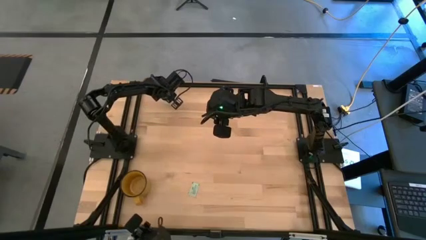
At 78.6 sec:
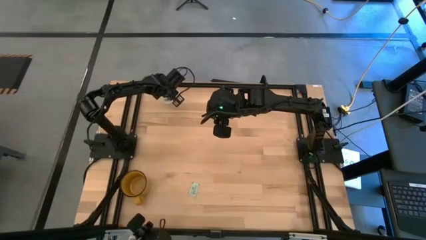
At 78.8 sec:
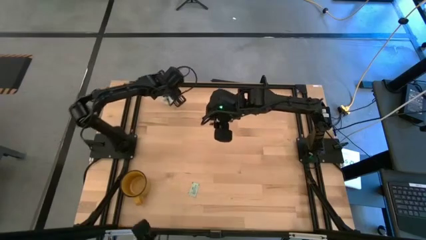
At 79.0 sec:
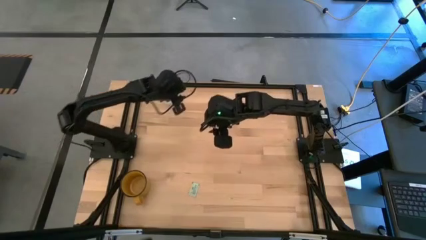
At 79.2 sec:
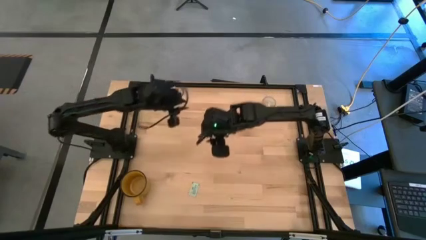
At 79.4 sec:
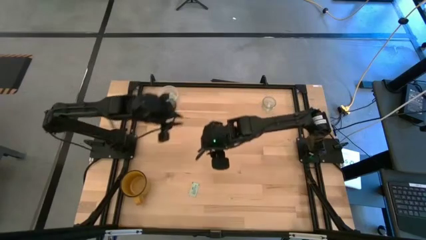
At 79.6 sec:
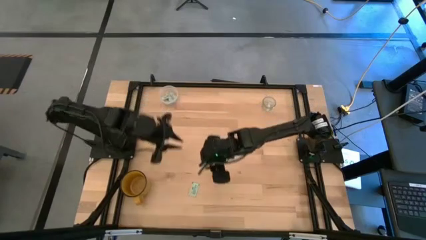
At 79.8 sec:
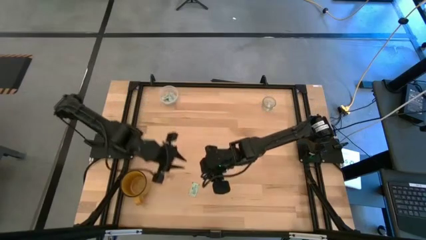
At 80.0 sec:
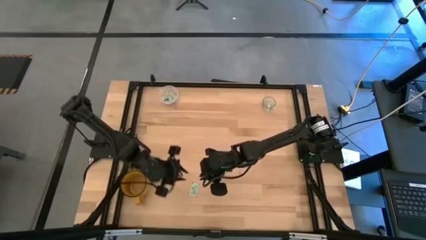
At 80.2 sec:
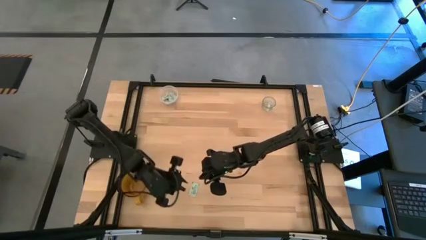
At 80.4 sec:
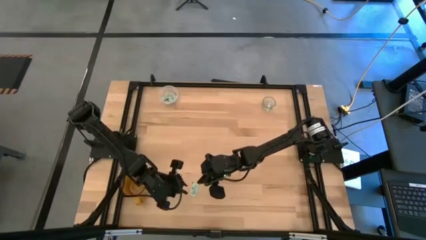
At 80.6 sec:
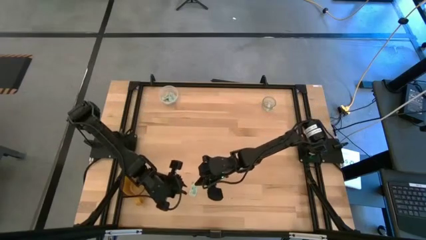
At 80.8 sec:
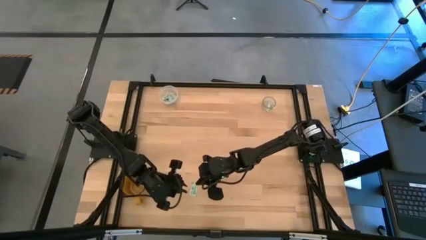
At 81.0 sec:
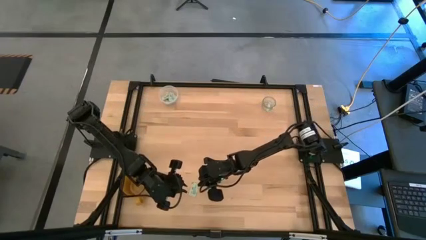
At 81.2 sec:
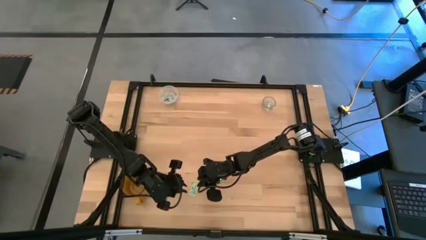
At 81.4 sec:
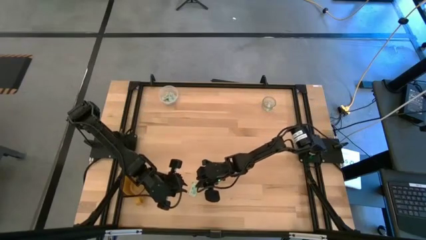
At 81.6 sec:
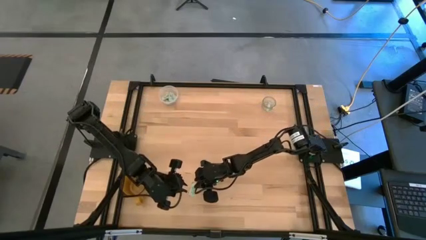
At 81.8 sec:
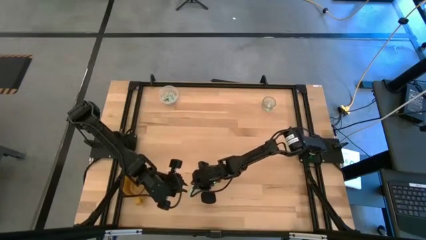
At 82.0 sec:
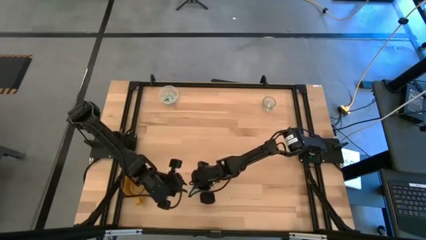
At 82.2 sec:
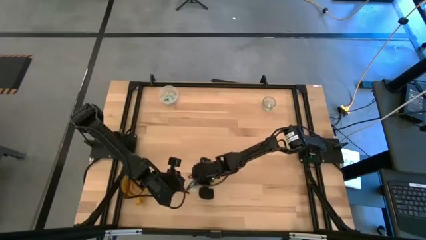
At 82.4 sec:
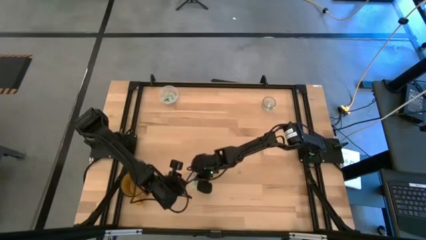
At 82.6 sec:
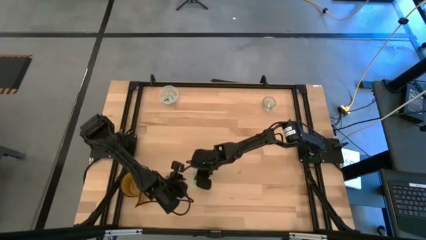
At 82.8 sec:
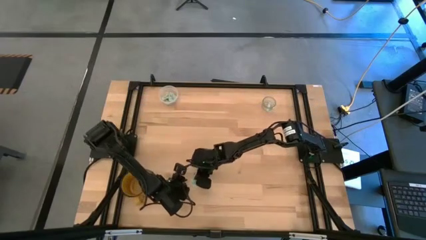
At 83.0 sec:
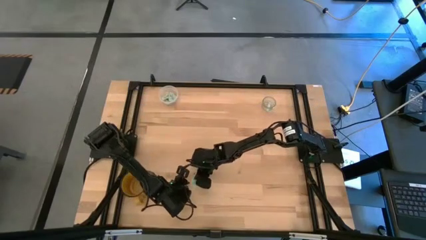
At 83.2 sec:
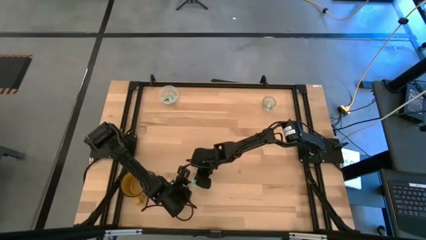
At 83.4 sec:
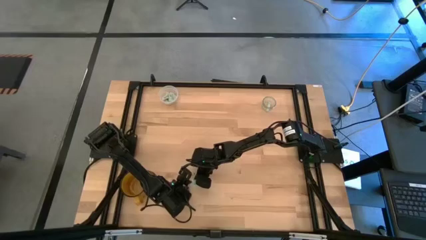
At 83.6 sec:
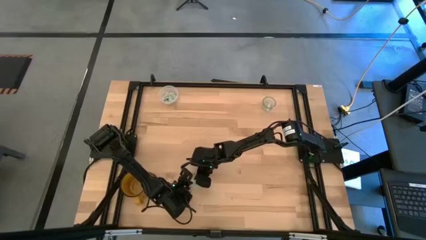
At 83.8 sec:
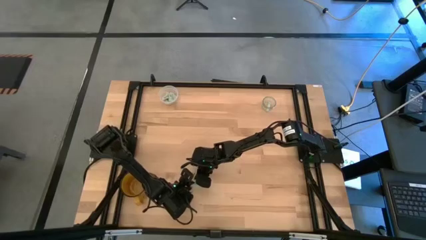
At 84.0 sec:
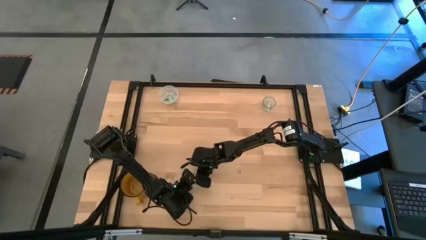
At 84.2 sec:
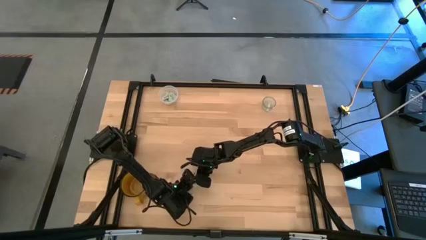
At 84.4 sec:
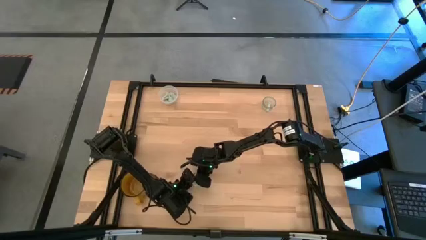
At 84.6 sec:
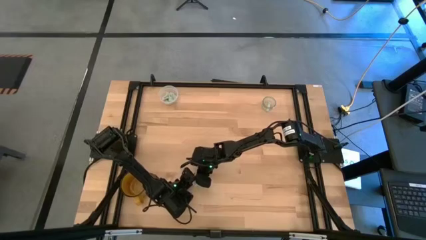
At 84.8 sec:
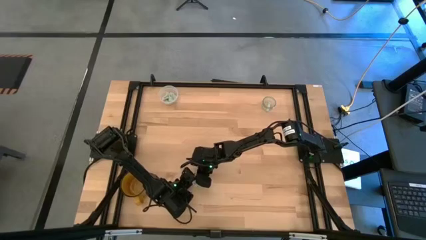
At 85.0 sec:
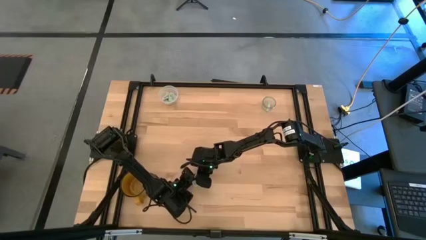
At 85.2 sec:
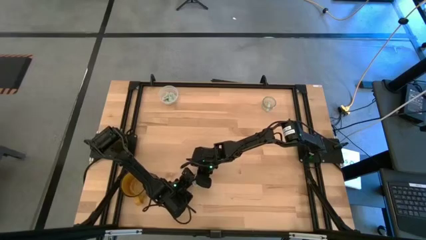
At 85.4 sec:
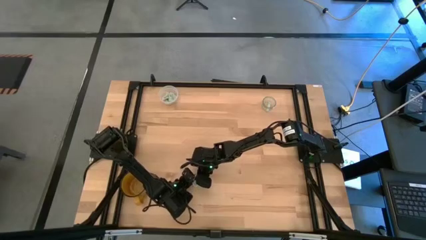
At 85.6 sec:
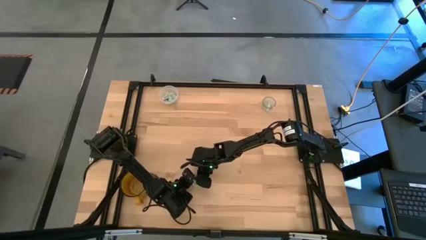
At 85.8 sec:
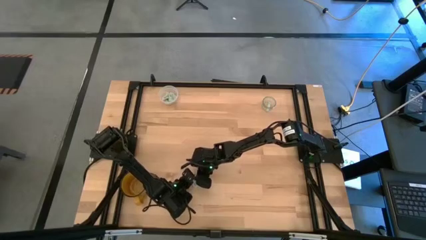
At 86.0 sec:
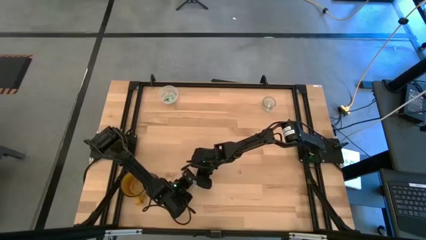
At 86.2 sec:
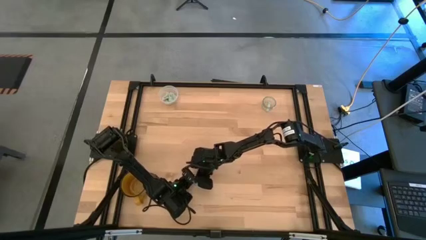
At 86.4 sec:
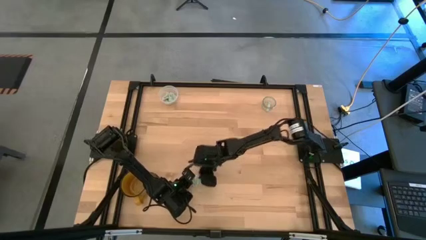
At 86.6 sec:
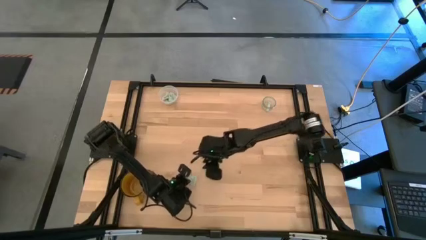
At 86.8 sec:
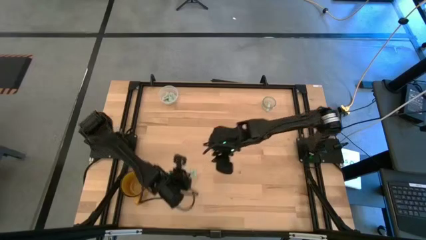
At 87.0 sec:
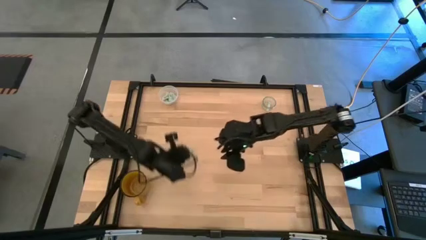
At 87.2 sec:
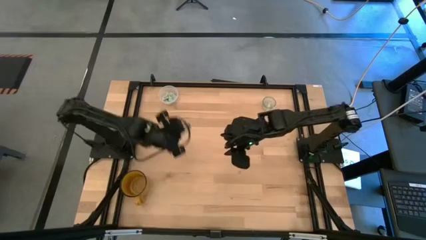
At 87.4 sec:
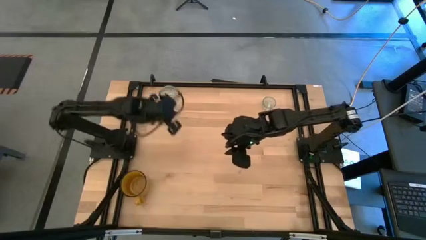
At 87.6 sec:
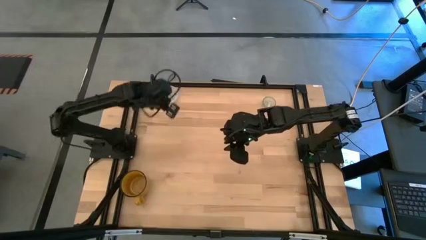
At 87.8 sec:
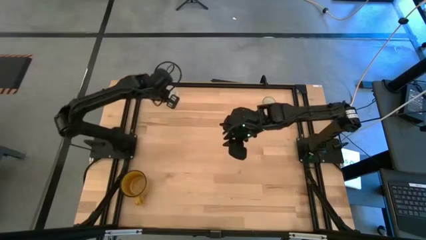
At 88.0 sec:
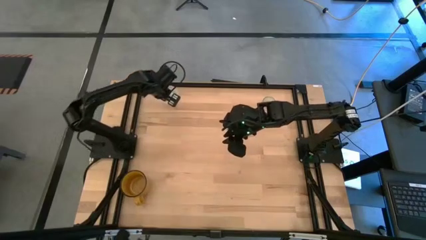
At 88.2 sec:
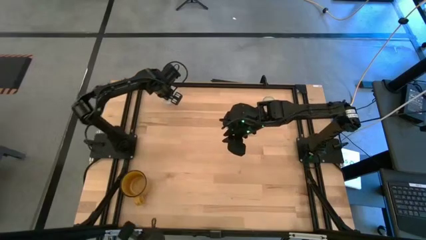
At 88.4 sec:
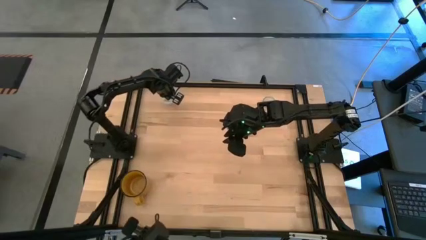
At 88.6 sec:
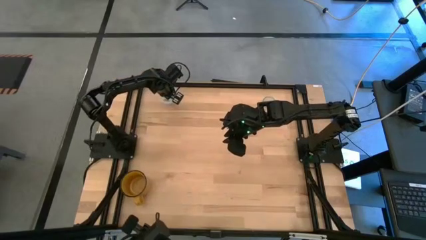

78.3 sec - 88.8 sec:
Task: Pick and place Stevia / Truvia into bins
Put the green stevia packet into the transparent container

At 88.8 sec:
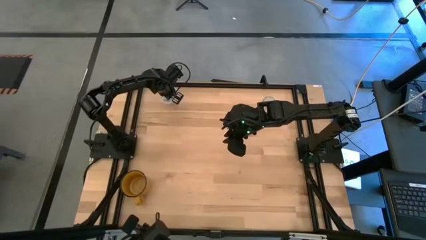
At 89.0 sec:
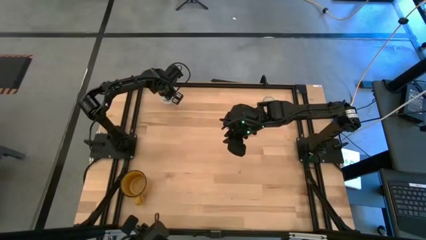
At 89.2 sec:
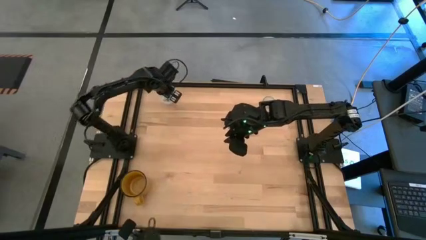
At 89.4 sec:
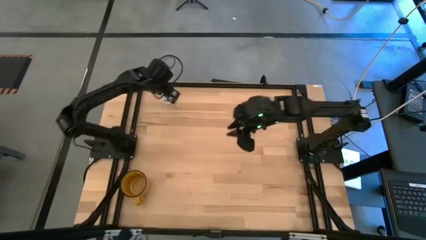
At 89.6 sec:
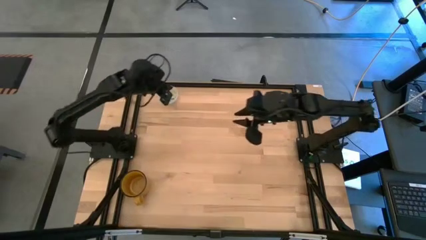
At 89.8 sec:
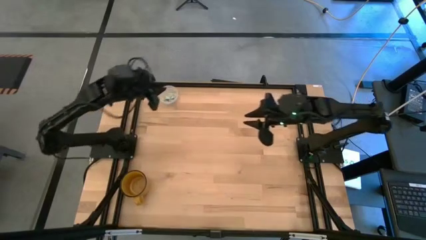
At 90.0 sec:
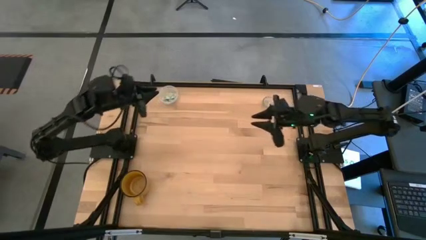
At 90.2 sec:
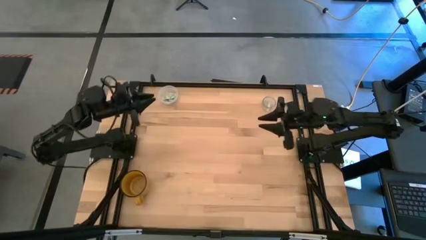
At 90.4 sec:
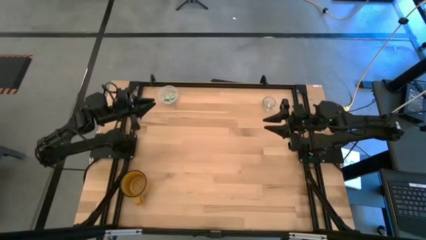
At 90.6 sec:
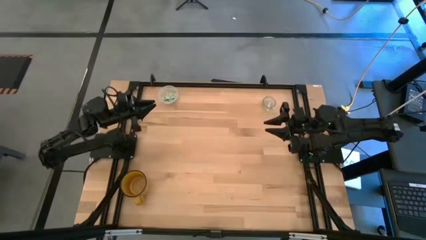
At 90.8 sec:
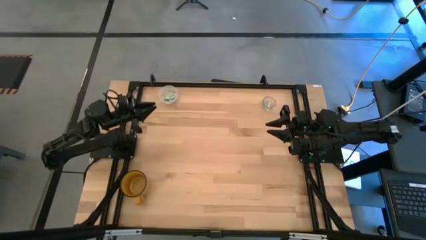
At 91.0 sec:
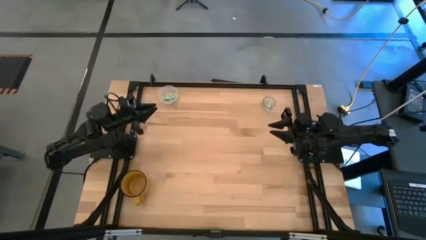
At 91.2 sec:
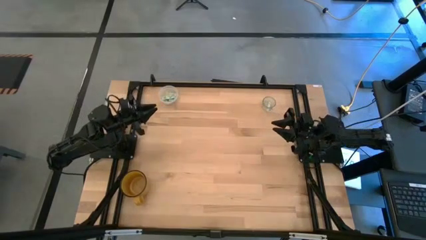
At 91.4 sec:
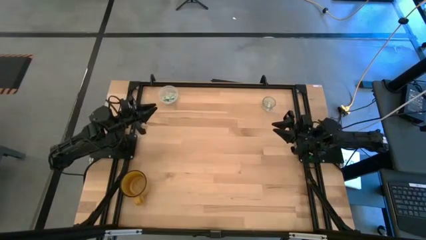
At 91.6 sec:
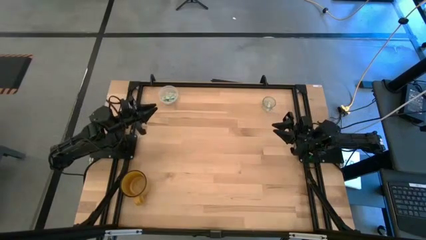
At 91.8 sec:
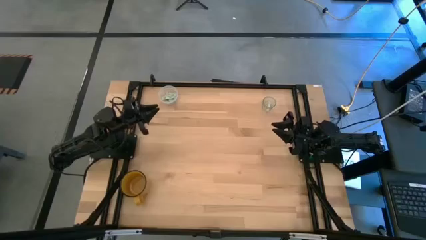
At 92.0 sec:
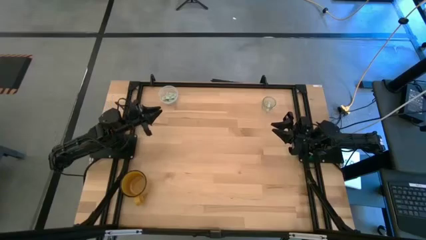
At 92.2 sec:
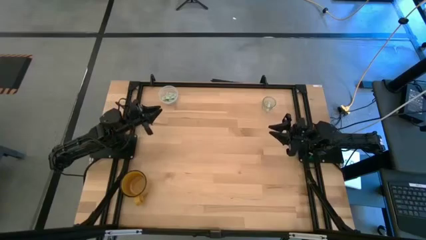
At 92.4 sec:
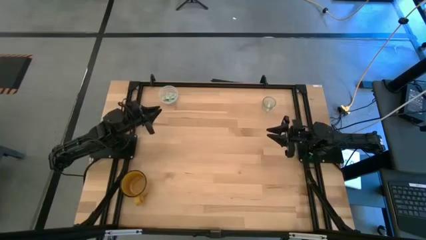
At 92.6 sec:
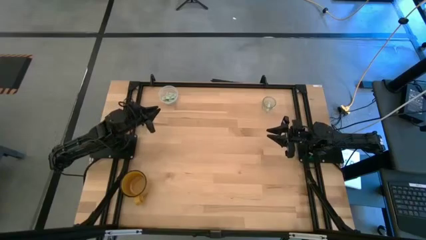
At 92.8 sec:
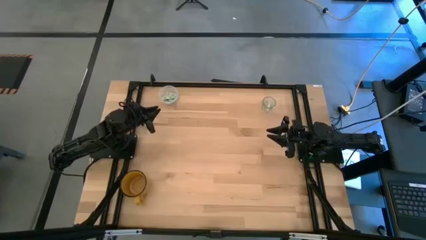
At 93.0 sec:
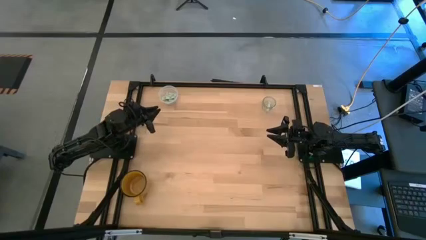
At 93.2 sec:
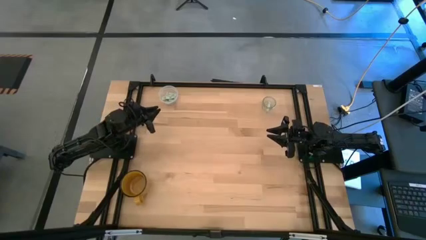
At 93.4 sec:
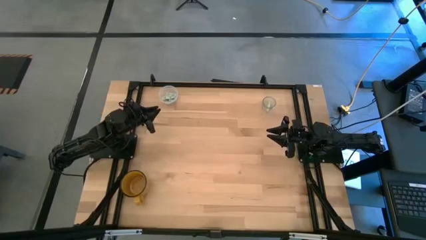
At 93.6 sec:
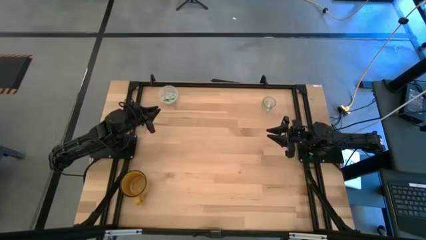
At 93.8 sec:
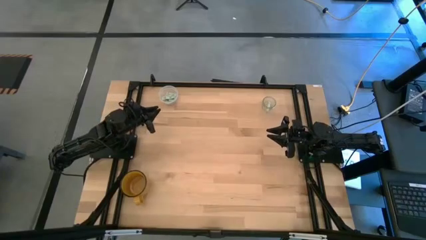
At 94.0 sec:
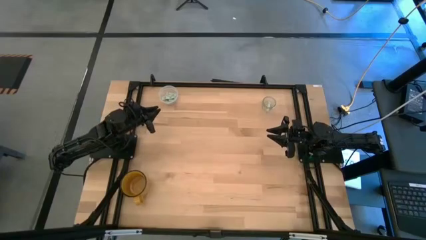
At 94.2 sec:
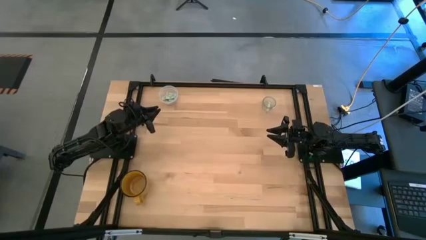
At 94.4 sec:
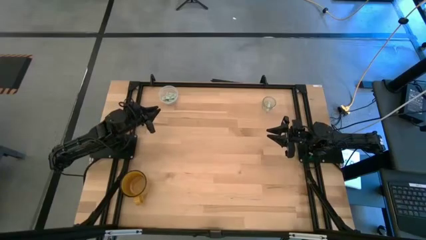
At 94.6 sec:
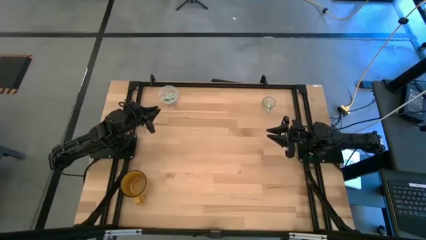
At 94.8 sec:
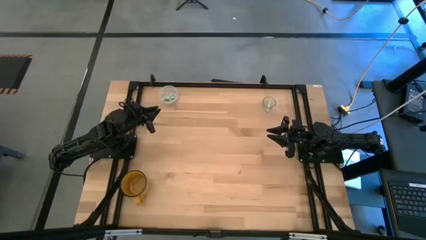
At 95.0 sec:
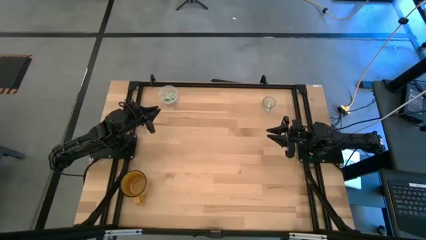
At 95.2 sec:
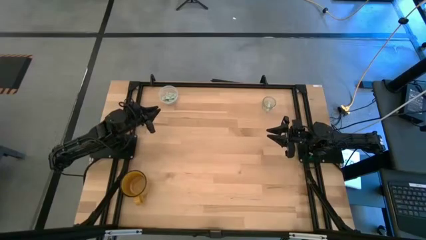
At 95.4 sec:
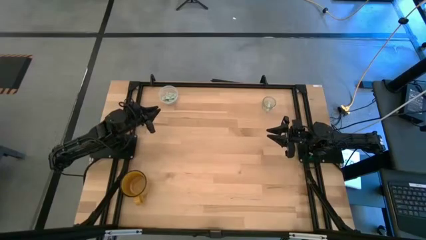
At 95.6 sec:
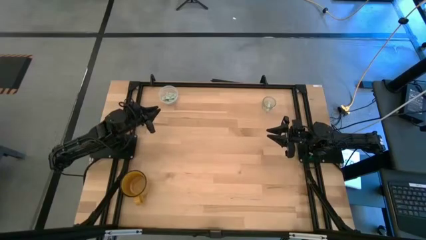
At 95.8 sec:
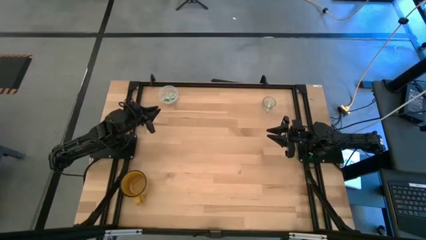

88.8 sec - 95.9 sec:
Return to Home Position
